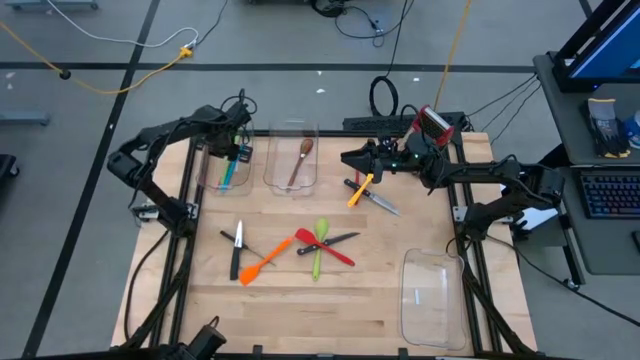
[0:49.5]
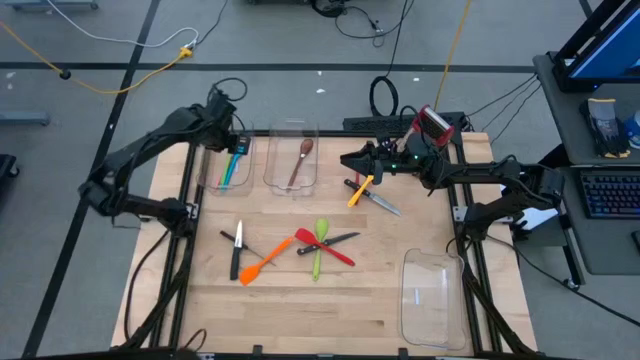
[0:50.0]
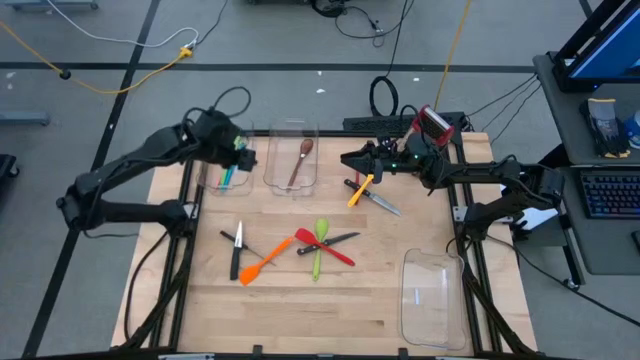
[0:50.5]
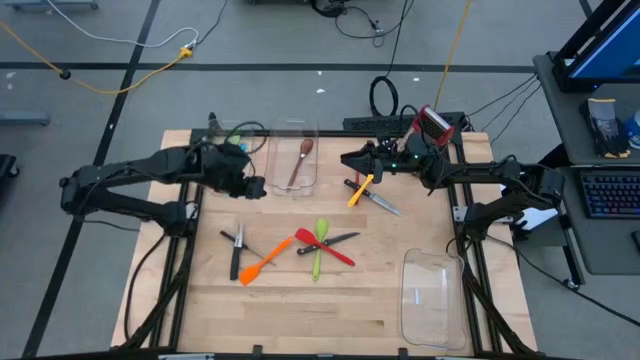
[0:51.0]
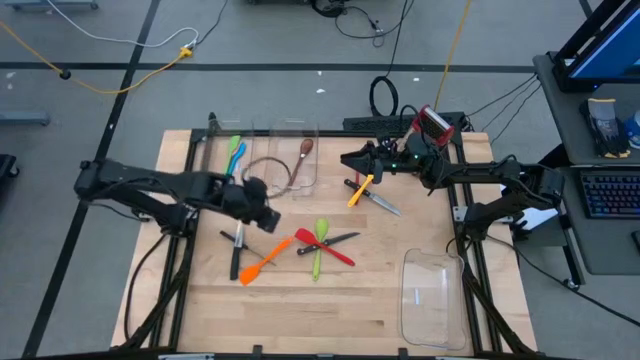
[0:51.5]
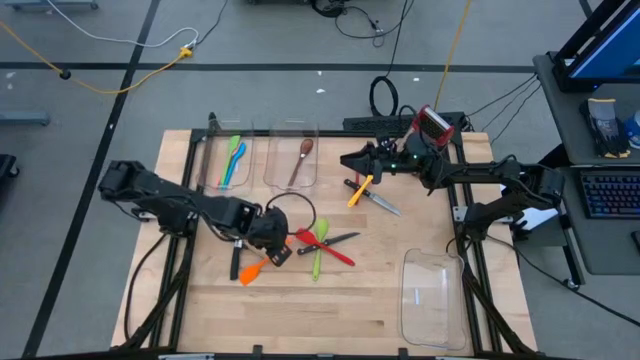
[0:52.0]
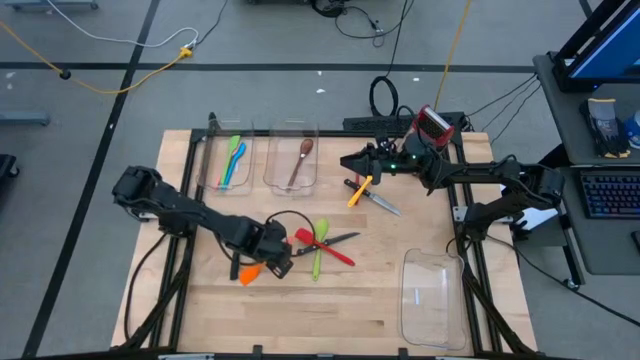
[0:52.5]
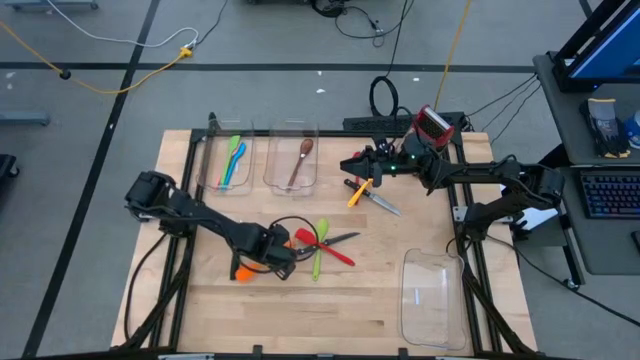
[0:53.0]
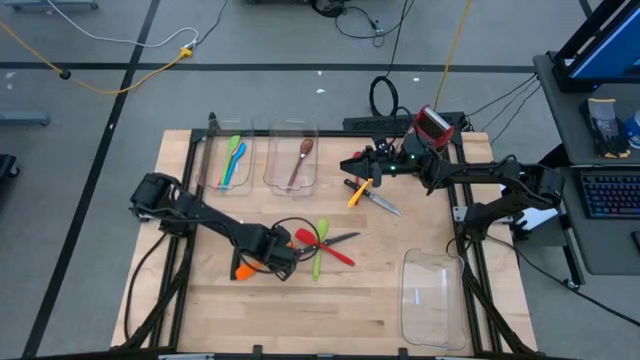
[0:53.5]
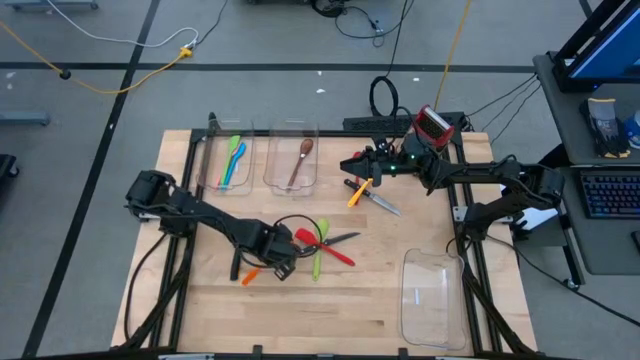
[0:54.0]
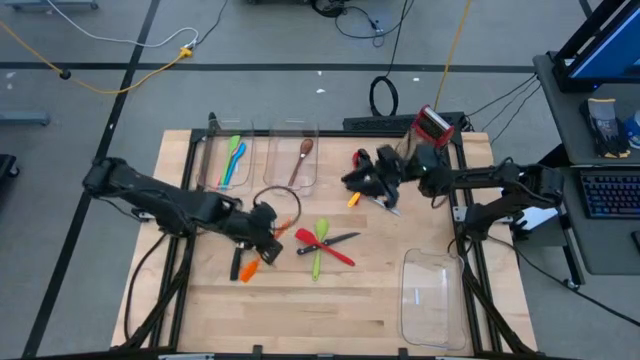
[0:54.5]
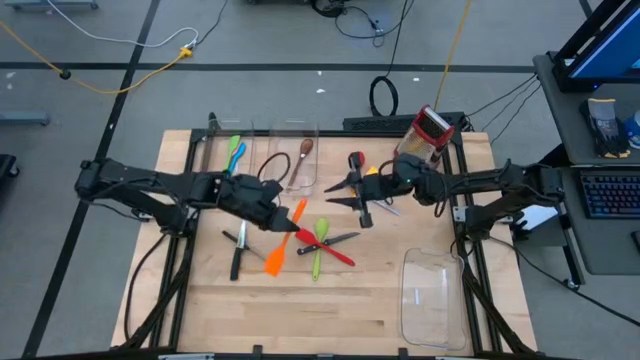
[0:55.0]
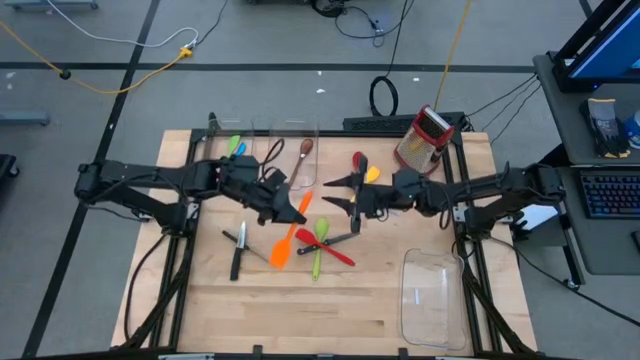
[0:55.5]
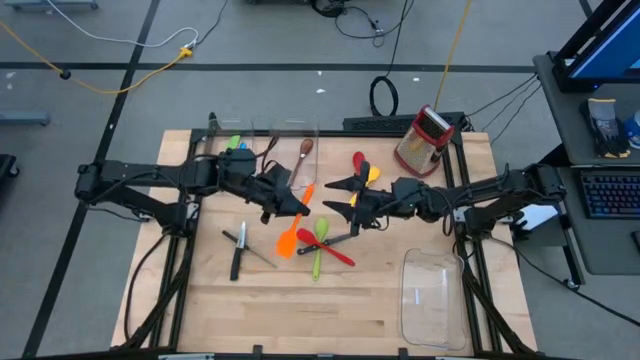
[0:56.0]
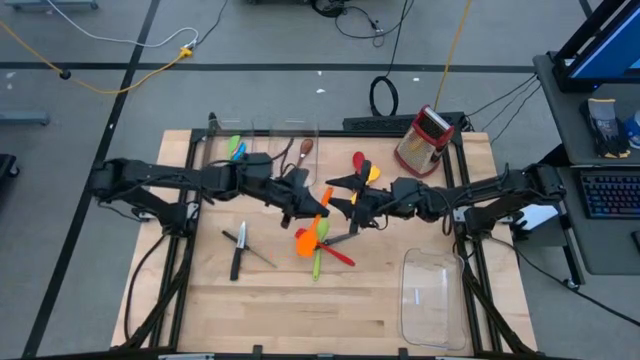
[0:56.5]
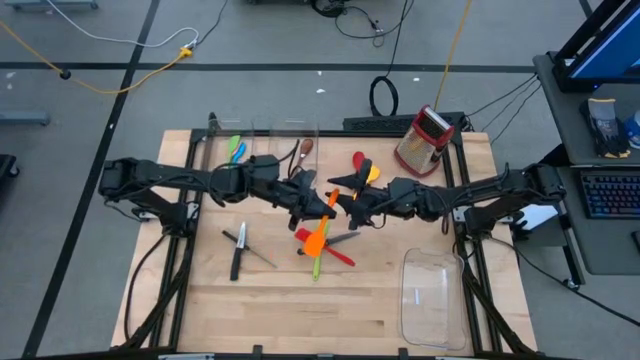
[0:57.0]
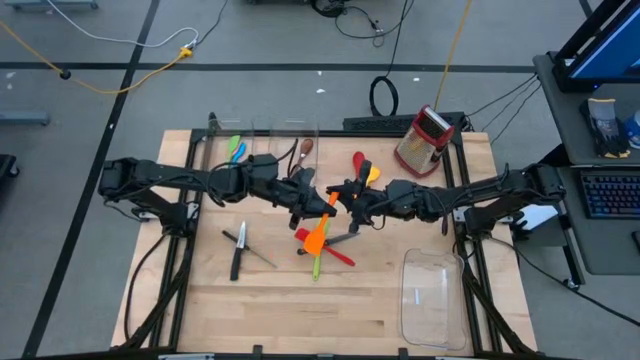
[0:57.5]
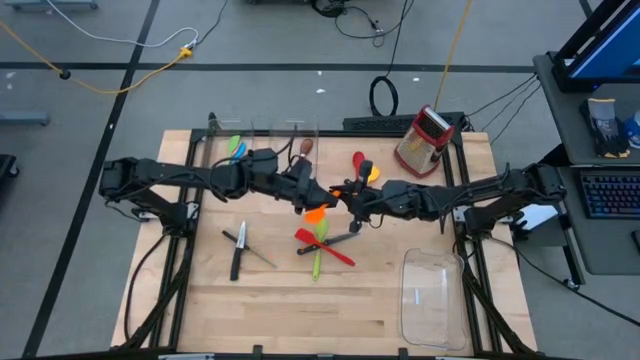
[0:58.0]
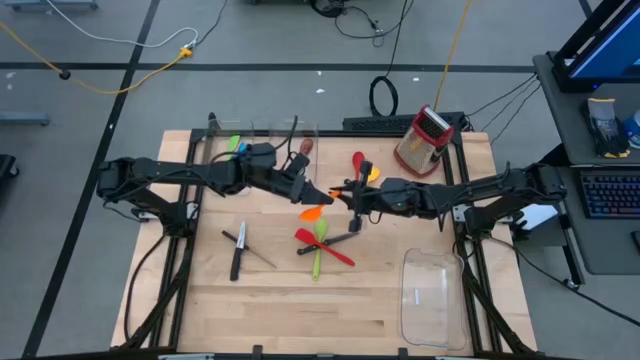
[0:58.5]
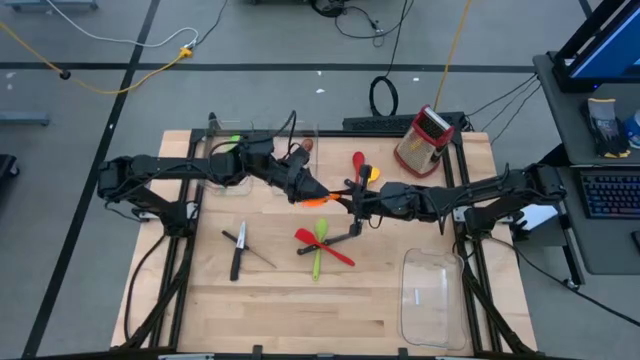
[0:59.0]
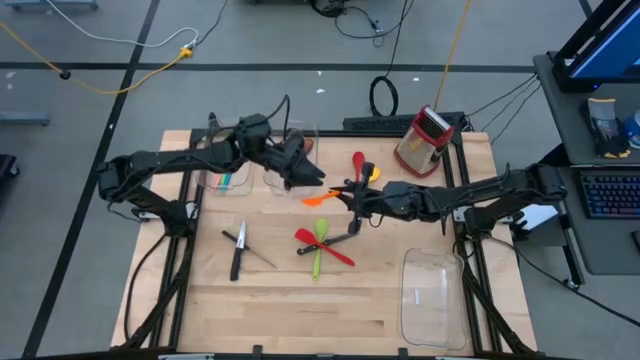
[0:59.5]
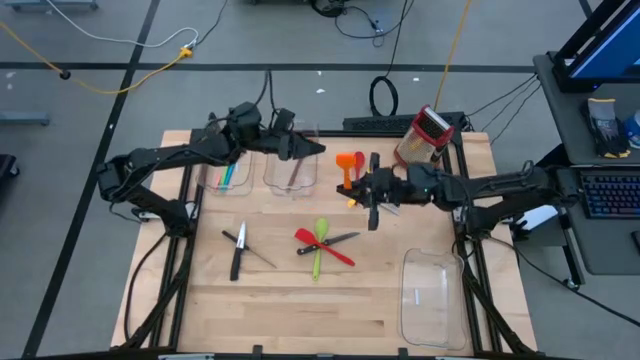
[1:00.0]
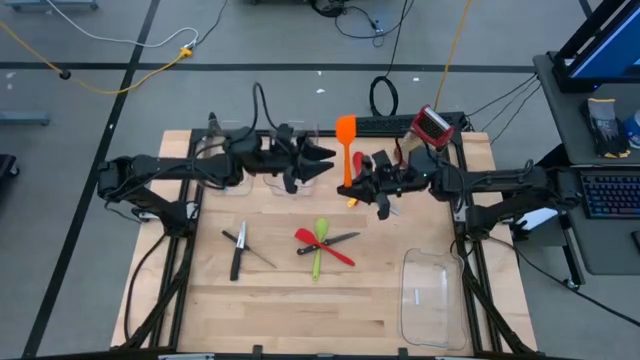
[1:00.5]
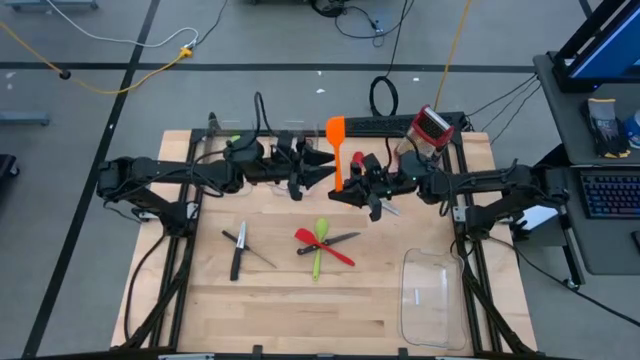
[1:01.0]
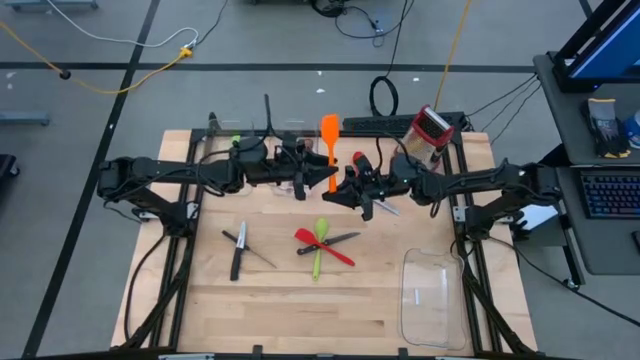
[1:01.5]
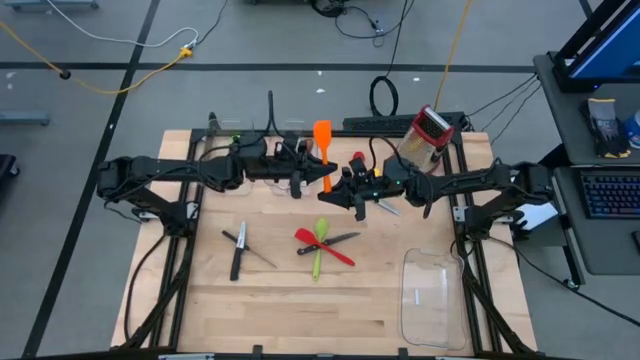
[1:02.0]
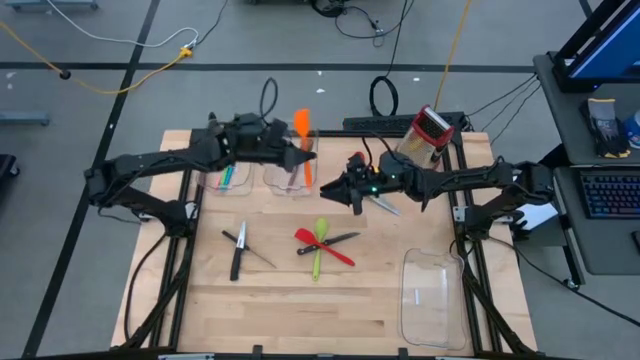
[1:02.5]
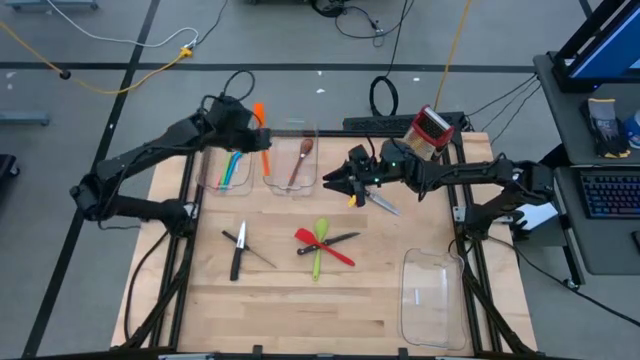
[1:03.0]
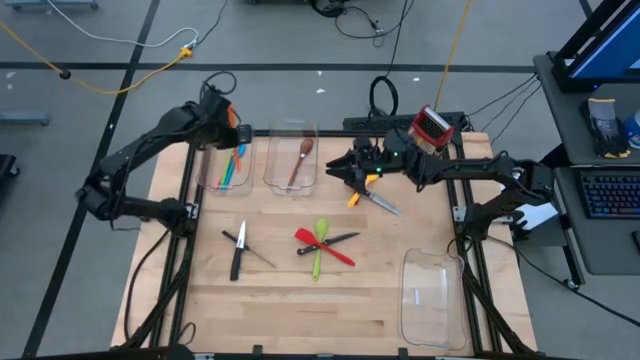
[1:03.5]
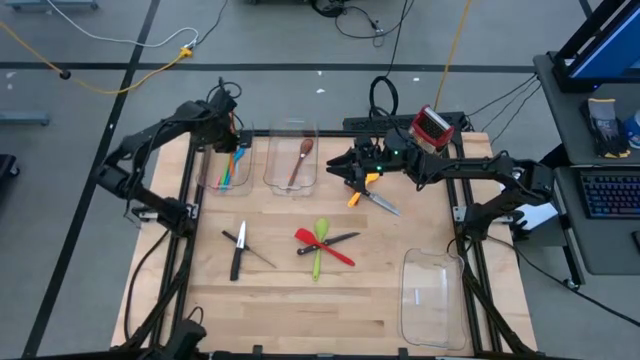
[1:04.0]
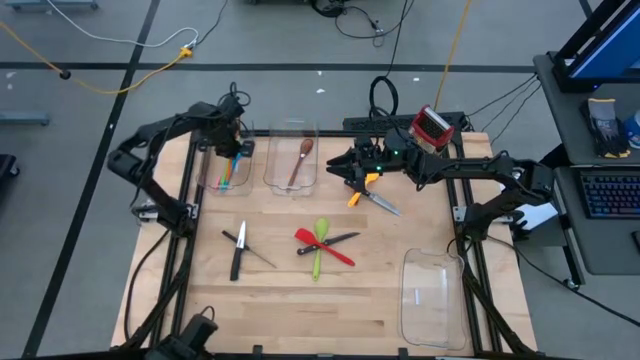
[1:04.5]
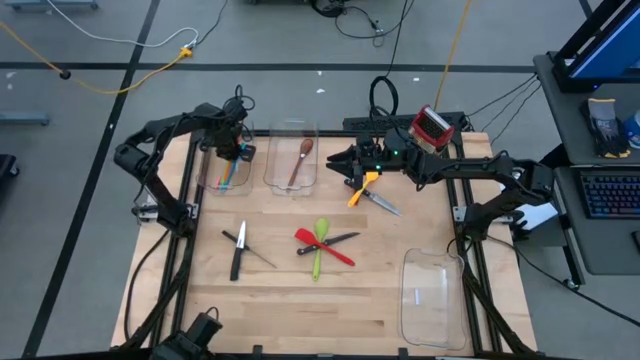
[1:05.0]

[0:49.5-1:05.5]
Task: Pick & Place Kitchen Items
Put the orange spatula into the left transparent bin

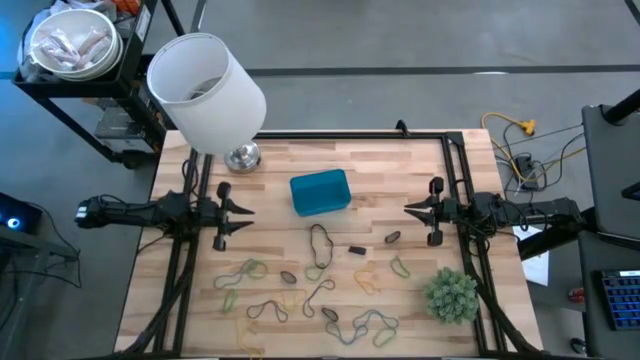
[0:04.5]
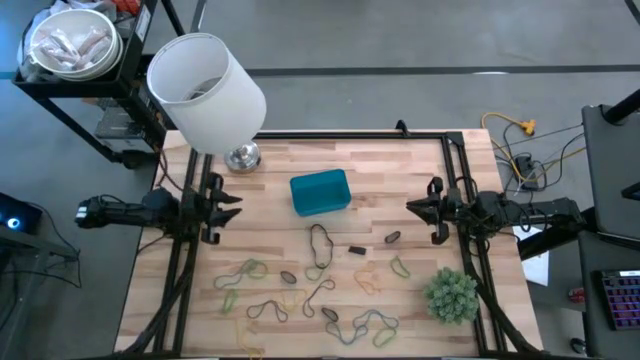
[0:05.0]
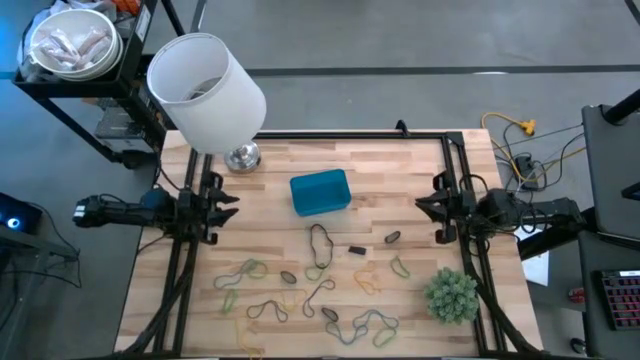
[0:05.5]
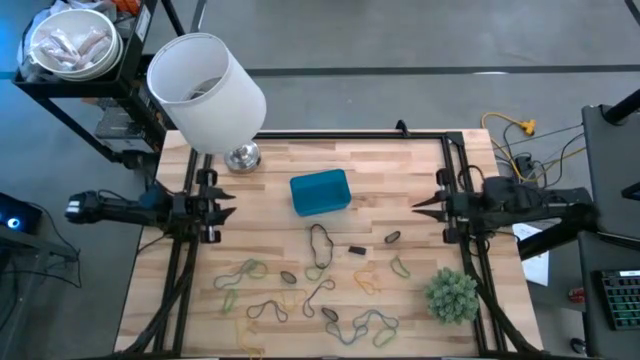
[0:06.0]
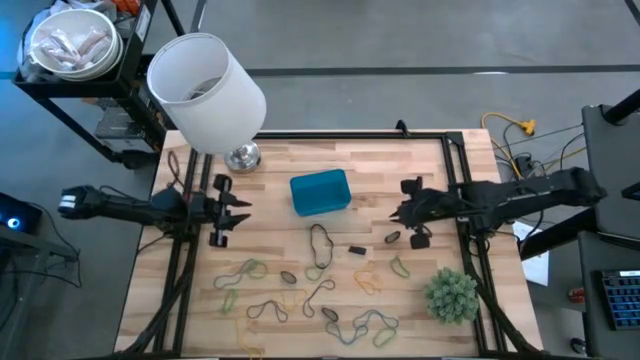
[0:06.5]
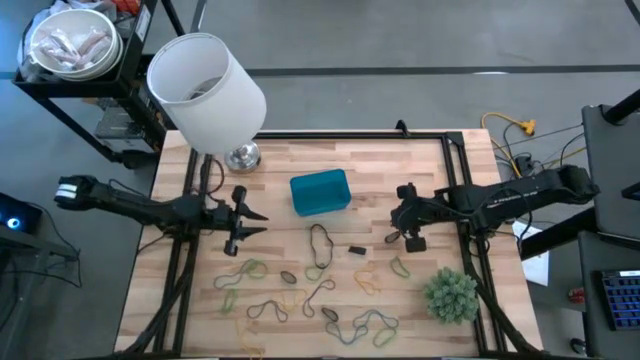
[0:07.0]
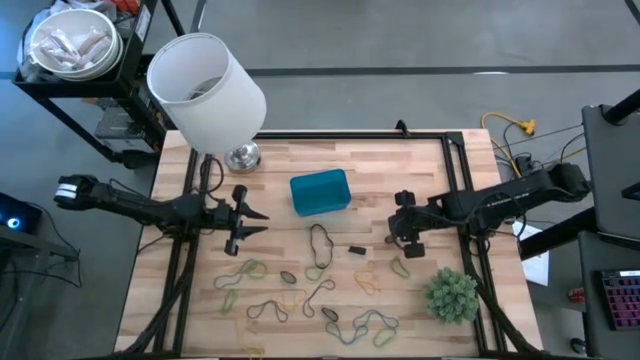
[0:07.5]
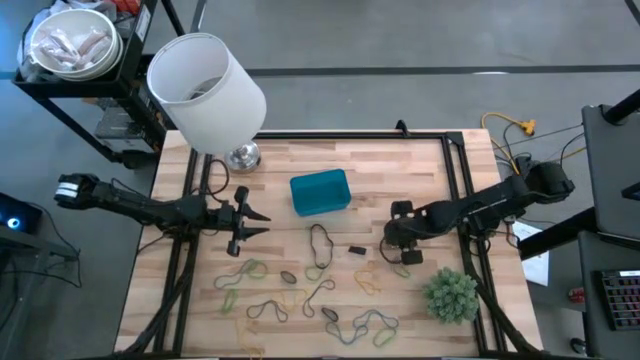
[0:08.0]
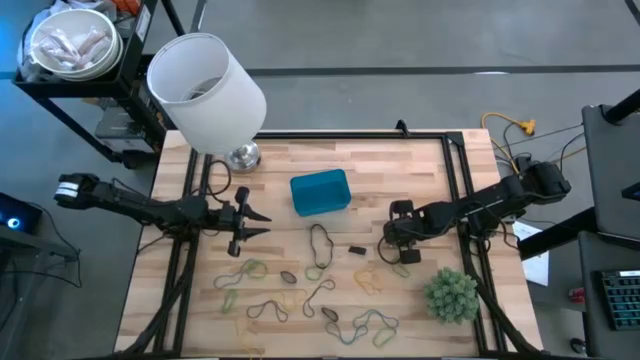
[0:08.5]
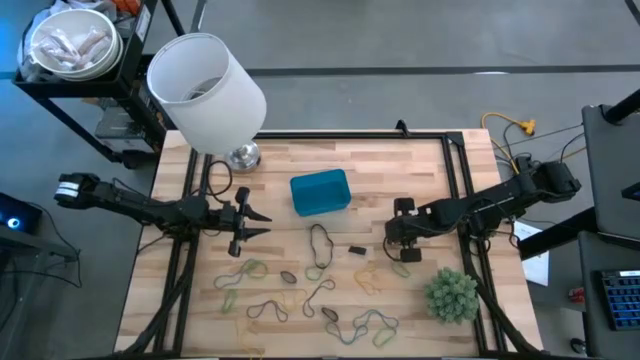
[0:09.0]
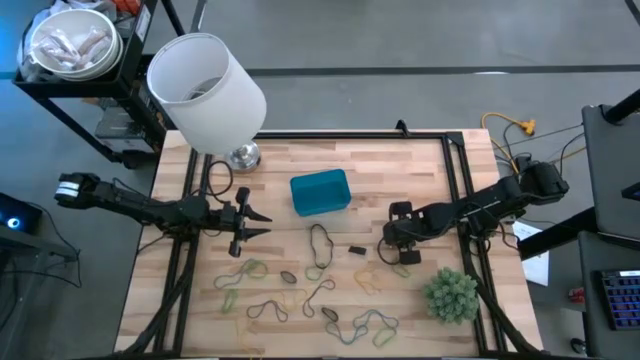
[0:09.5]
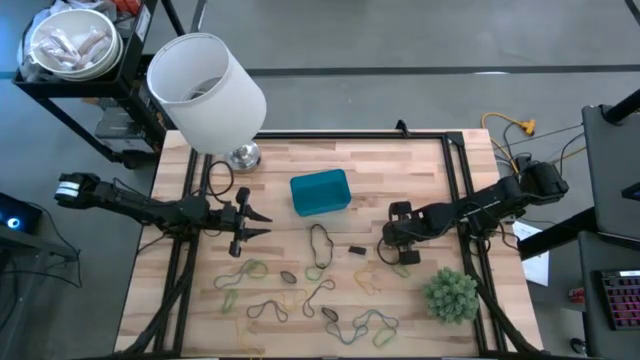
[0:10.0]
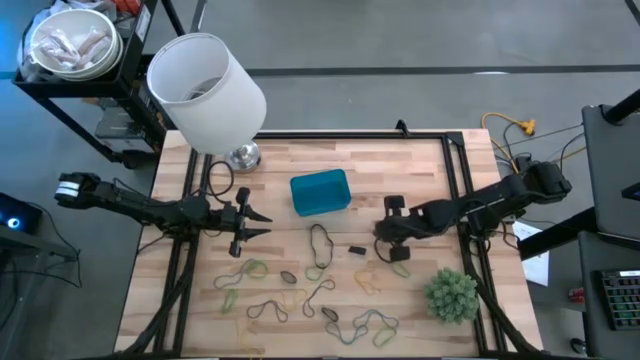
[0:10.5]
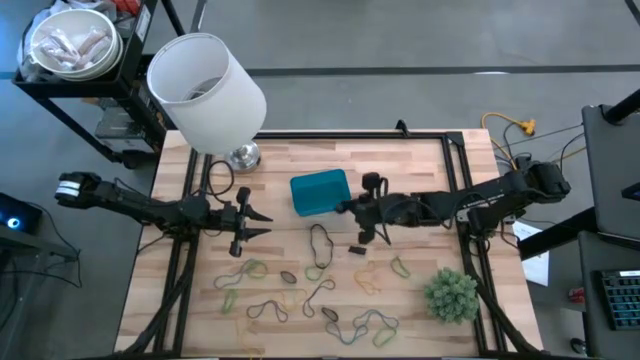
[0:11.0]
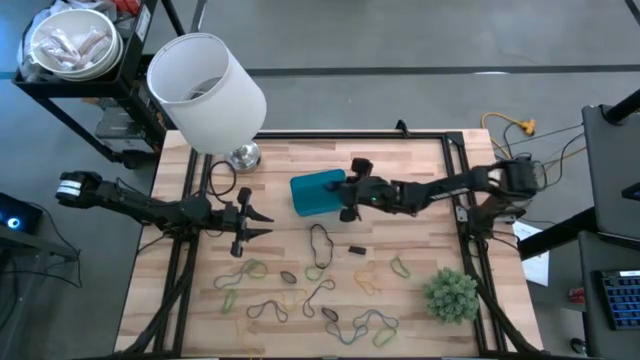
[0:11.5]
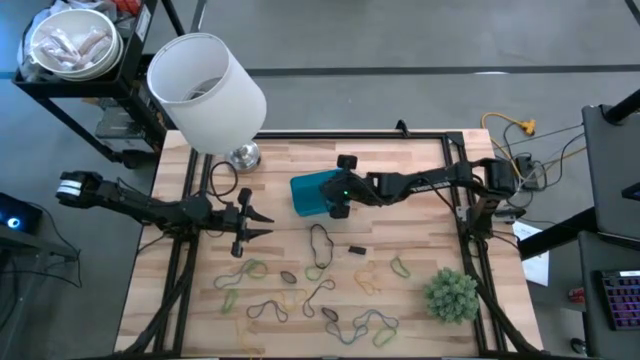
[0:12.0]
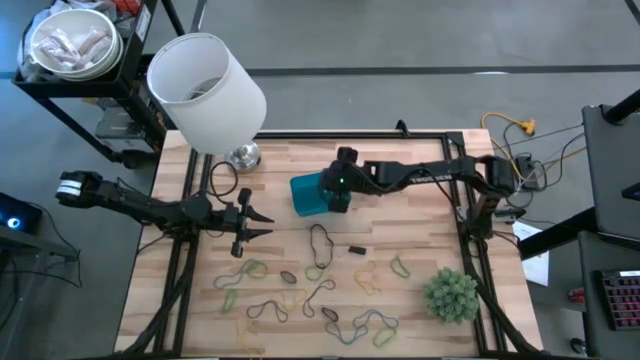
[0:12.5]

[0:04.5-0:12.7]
Task: Pick and place rubber bands into bin
Put the black rubber band into the blue bin
